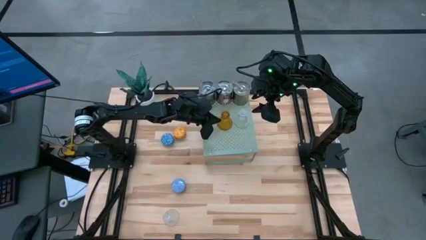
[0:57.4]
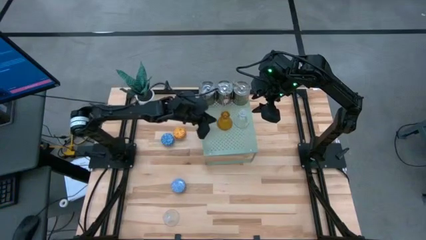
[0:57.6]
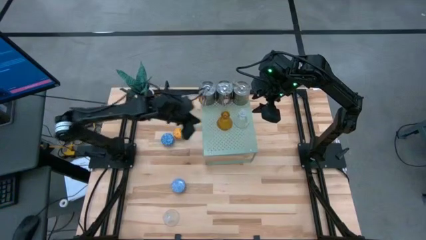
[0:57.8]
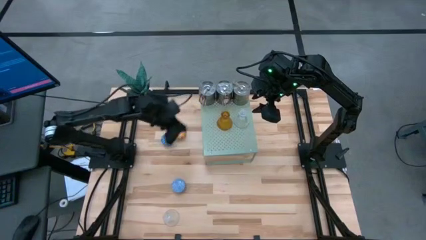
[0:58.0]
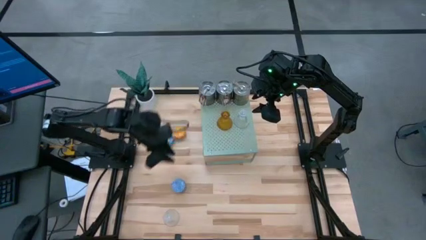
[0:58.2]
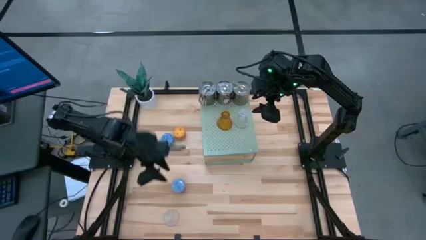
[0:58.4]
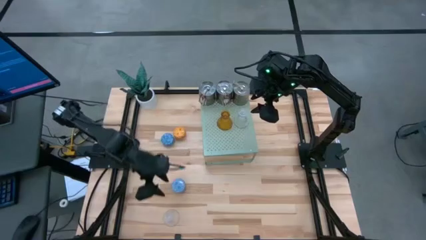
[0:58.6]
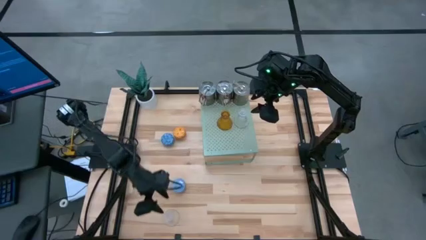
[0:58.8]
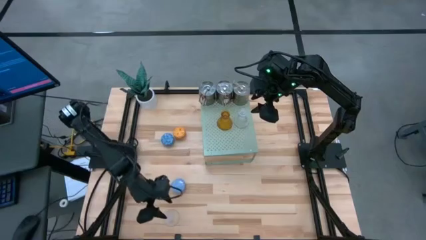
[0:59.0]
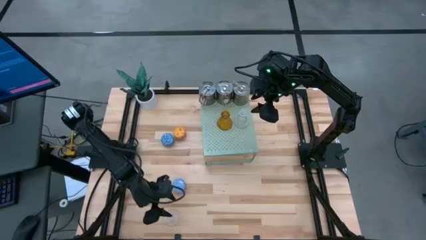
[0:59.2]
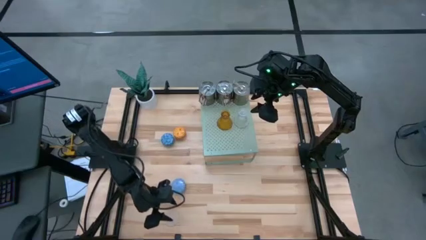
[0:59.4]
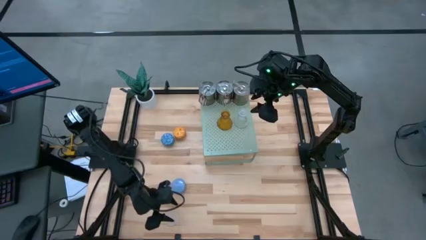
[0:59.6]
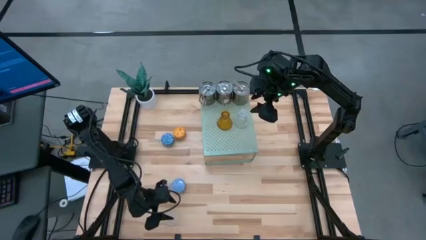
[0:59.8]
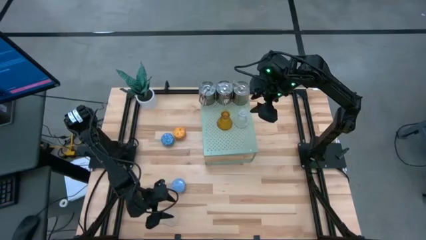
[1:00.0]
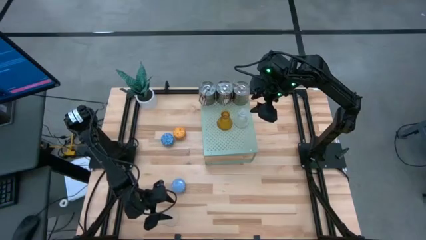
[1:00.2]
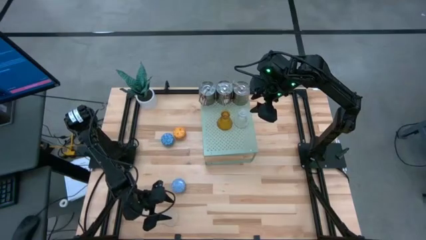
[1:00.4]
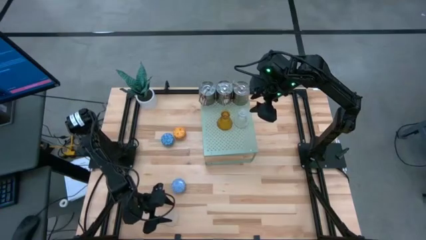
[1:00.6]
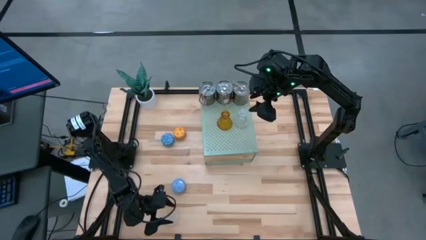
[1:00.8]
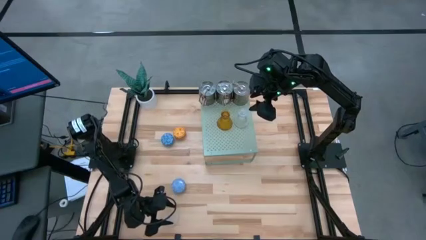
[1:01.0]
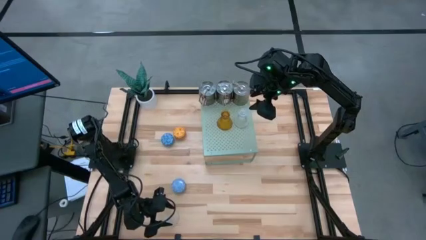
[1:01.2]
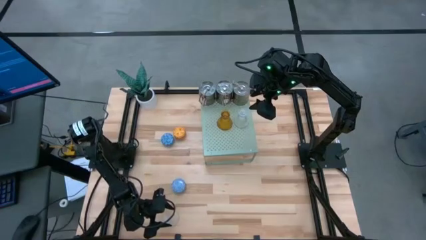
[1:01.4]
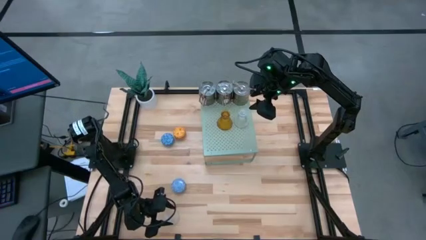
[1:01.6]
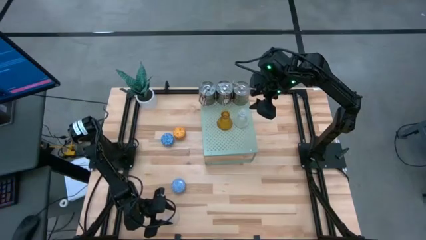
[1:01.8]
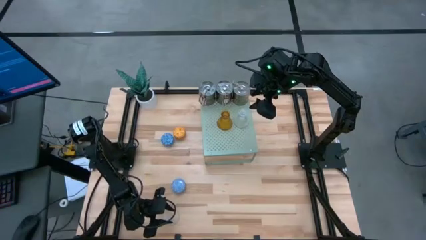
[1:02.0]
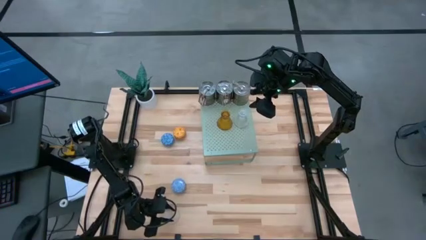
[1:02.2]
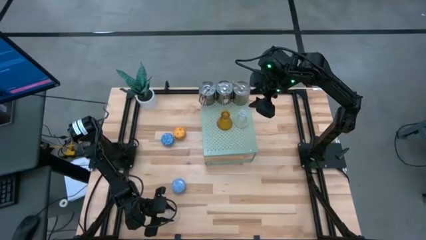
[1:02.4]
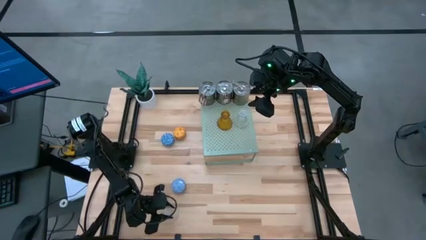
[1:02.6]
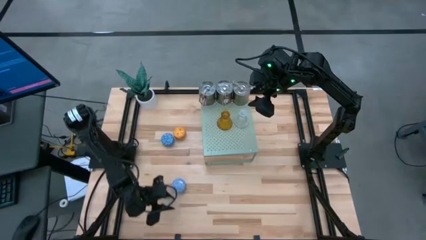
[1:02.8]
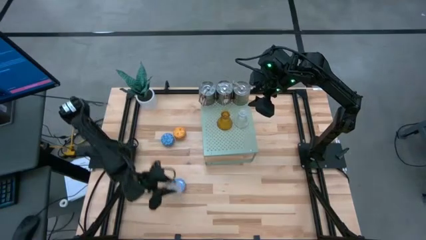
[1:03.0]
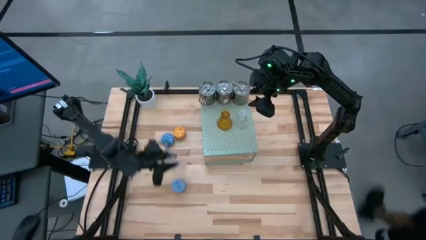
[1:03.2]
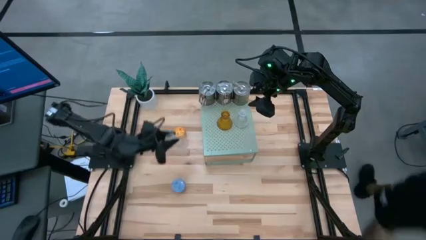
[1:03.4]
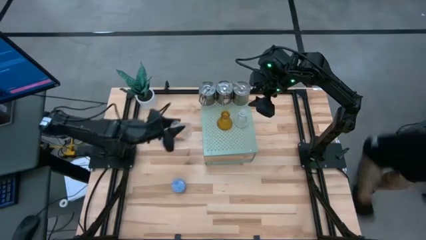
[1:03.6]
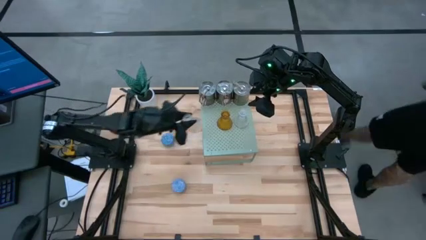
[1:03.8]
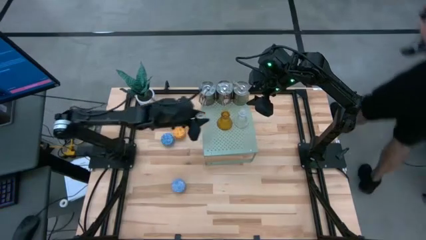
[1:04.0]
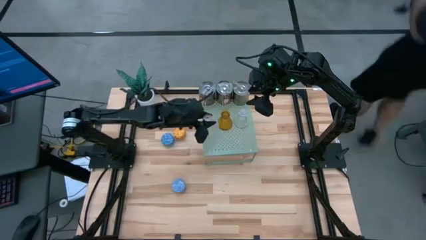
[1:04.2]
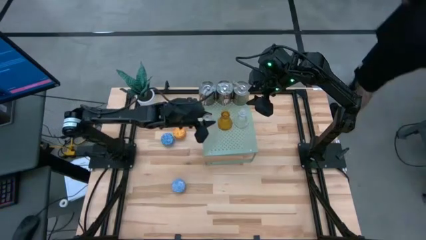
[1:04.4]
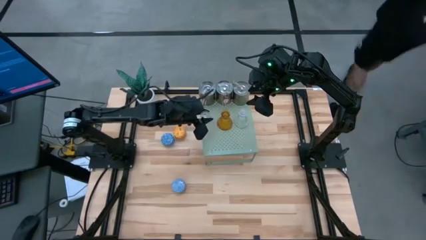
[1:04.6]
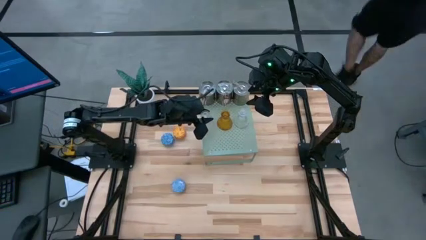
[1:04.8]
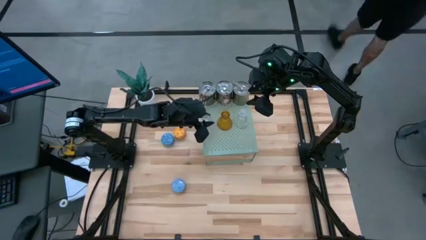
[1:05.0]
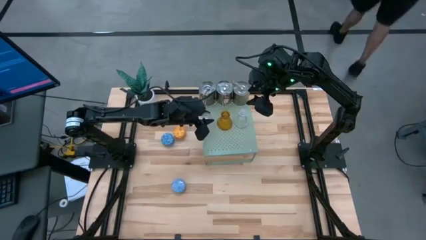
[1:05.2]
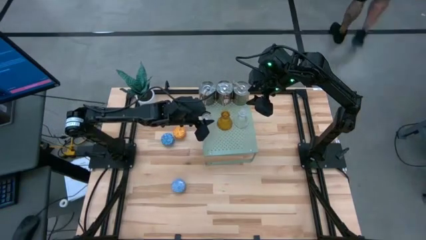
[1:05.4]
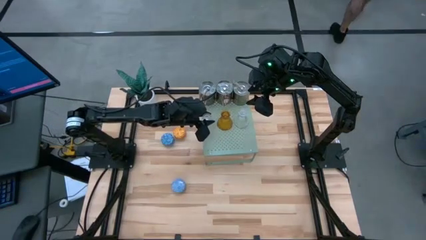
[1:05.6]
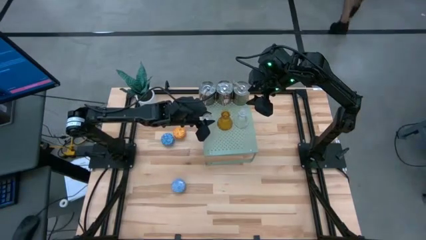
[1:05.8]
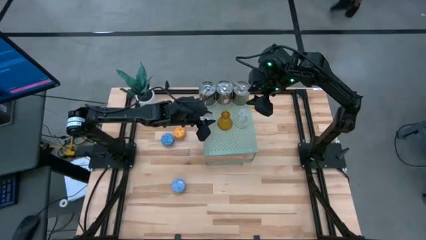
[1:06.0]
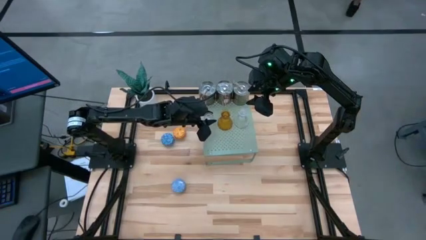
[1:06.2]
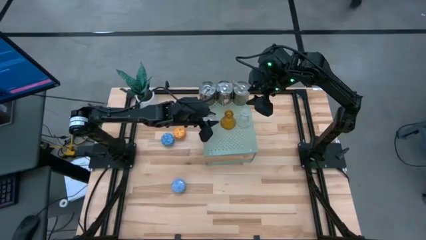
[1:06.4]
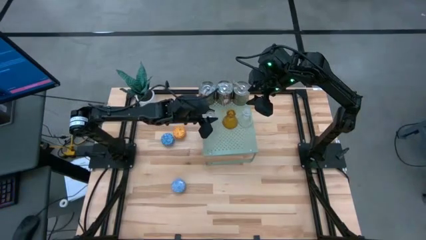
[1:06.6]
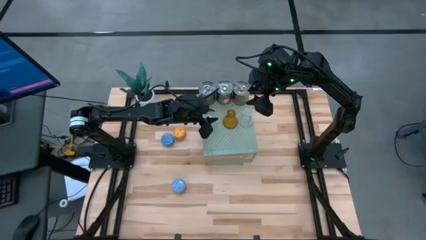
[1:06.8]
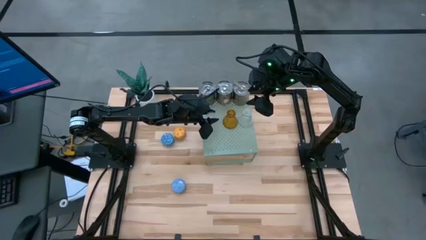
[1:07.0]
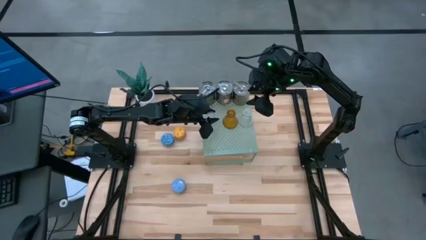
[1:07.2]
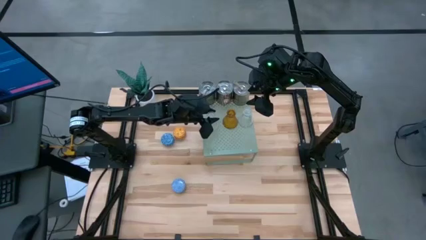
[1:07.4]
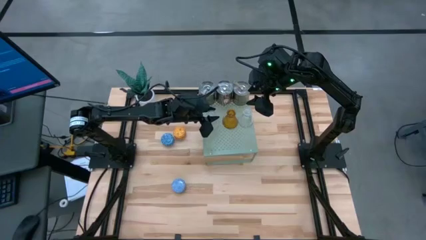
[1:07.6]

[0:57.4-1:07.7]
Task: Pick & Place candle stick holders
Put the transparent candle holder on the shelf

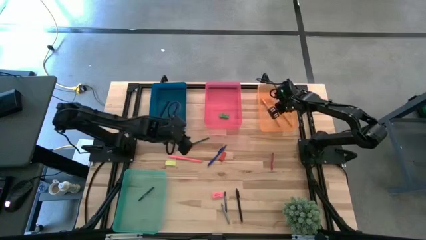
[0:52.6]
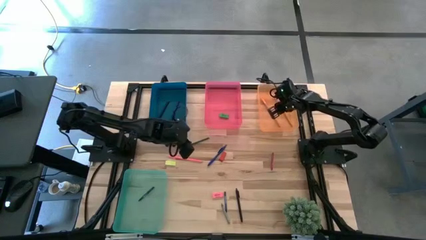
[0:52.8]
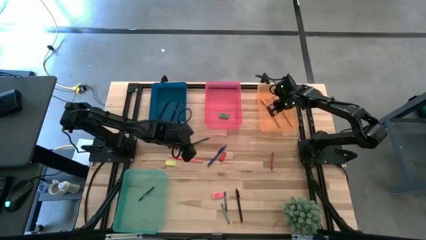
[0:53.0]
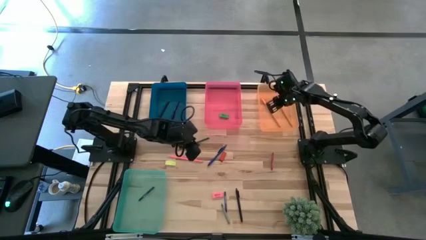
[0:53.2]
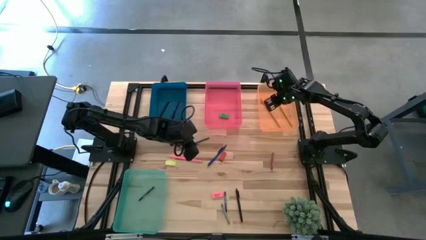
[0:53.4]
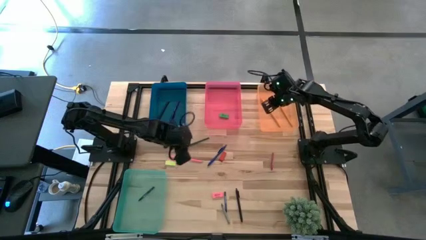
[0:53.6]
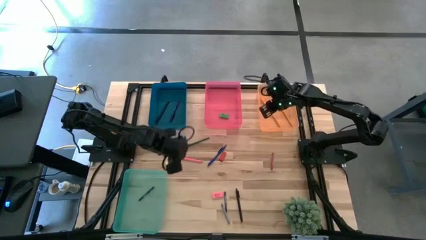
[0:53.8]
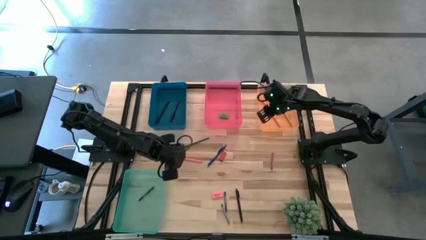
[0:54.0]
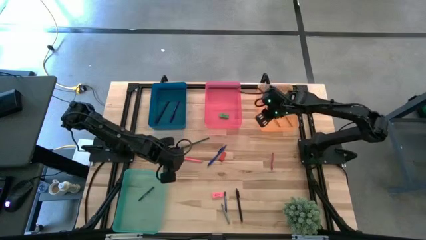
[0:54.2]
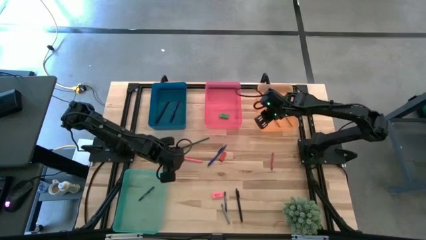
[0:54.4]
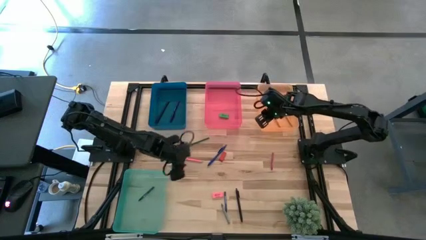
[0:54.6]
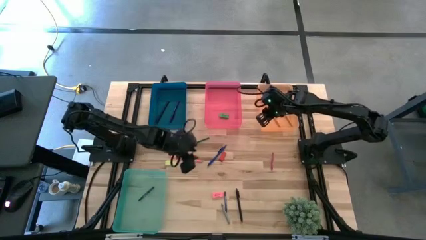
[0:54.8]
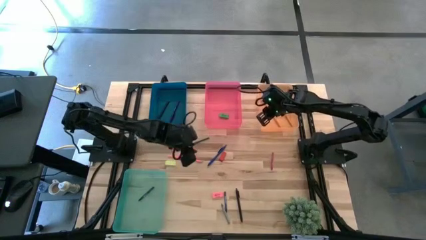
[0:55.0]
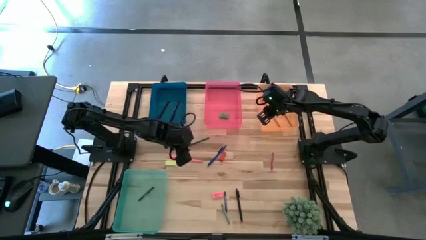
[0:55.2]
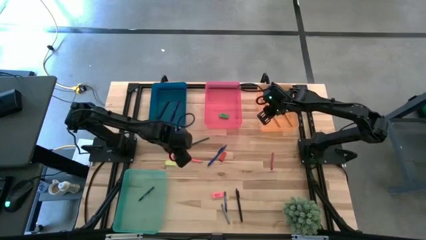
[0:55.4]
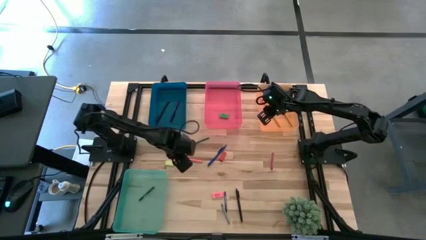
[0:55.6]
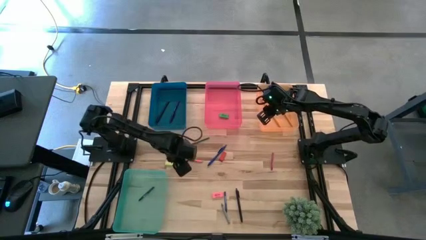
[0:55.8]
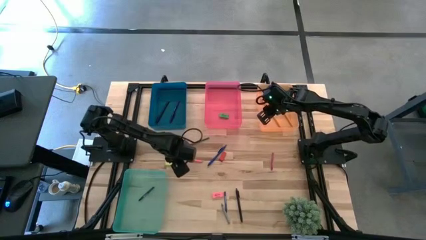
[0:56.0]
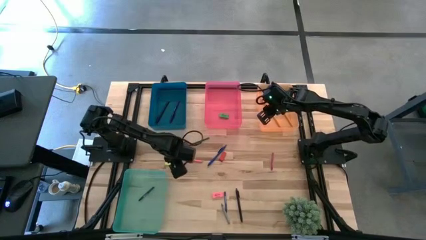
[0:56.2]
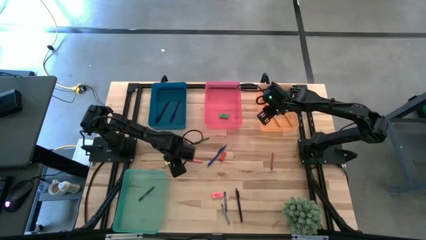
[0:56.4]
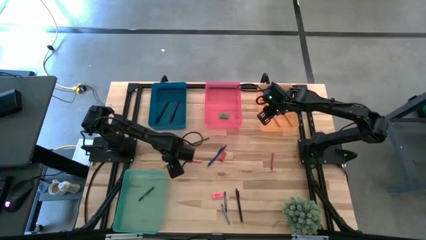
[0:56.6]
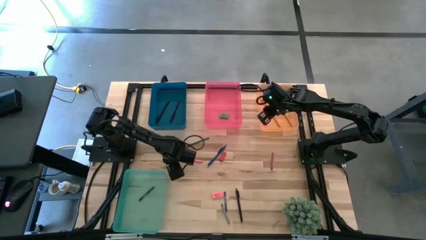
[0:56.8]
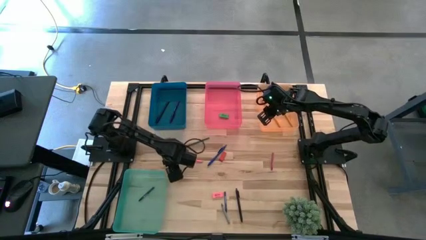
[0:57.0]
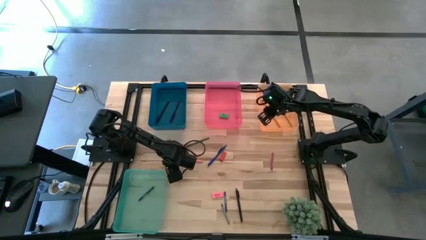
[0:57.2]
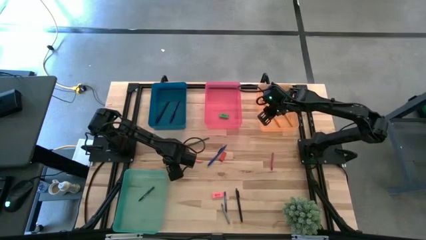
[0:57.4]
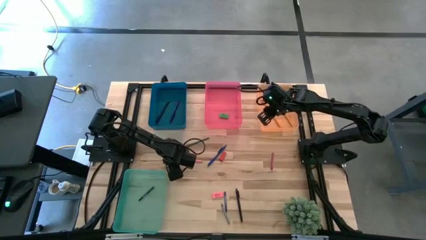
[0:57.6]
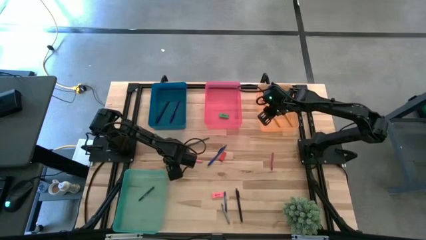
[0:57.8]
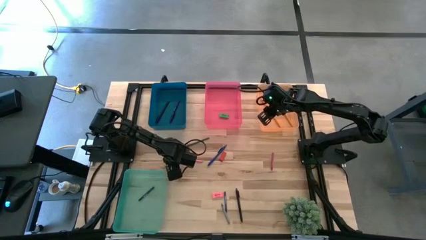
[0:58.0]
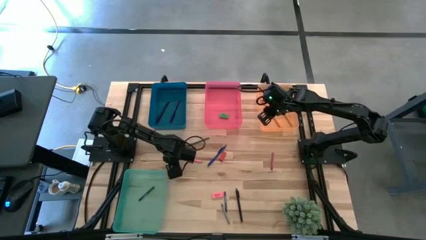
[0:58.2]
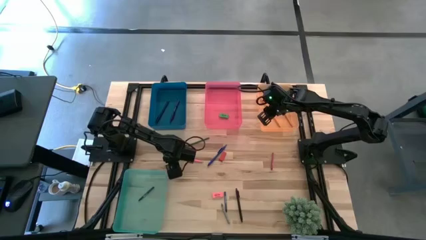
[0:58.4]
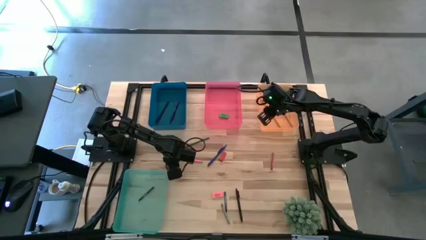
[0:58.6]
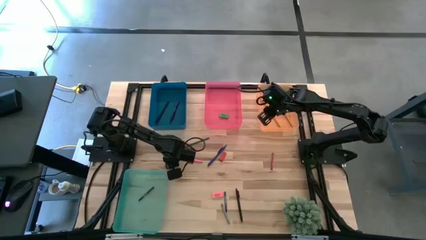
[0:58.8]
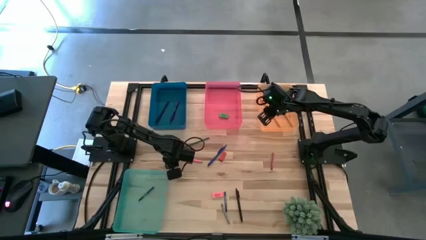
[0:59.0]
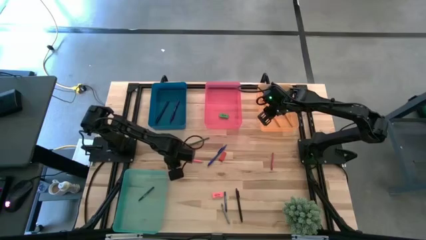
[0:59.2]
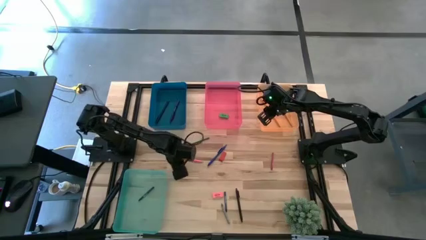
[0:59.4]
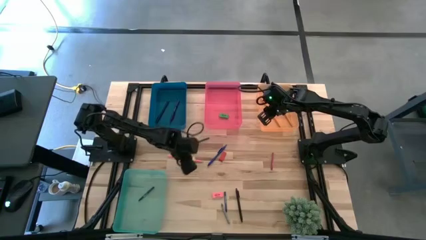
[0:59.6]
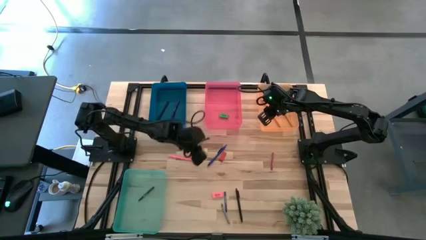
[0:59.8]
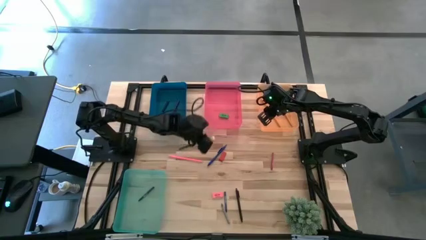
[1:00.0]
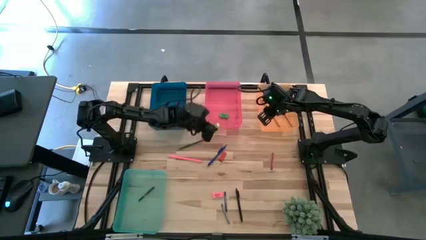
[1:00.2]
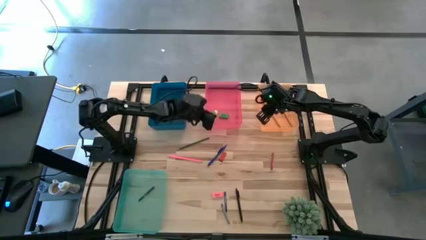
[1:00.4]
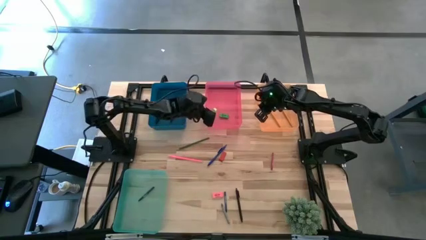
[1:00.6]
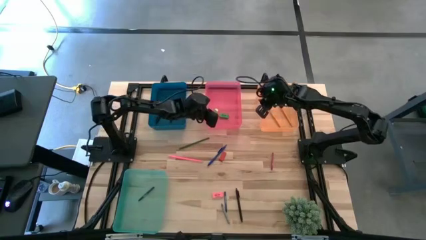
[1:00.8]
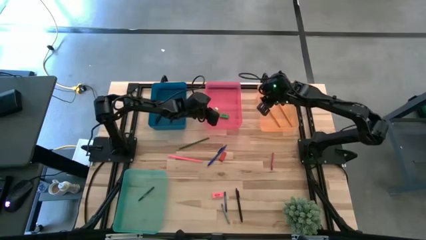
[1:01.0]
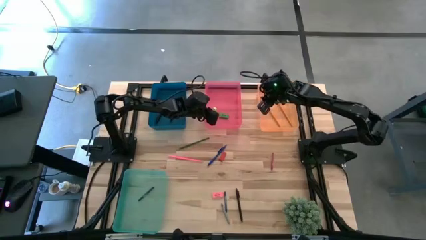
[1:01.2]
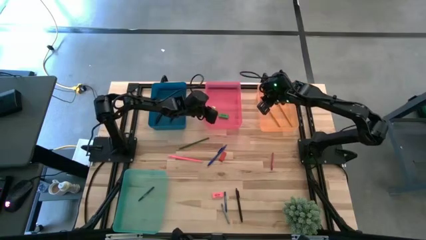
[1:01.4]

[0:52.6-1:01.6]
Task: Sort crayons/erasers/pens/pencils in bins
Put the yellow eraser into the pink bin
